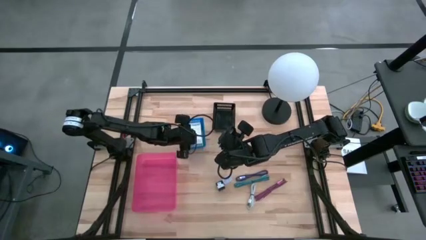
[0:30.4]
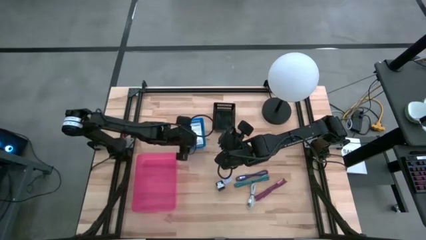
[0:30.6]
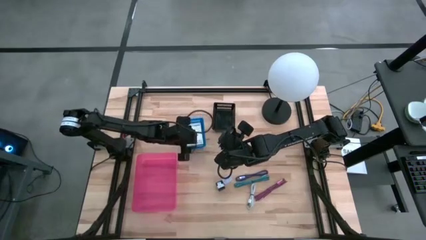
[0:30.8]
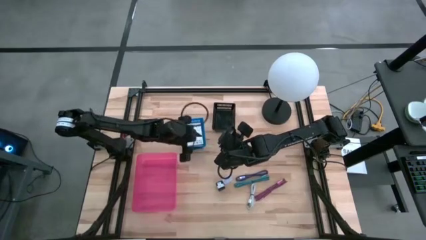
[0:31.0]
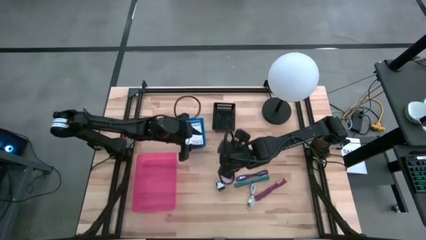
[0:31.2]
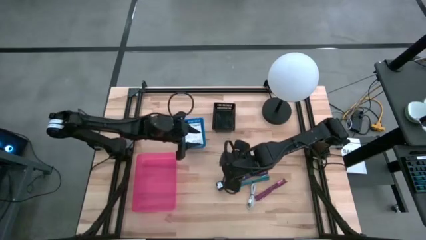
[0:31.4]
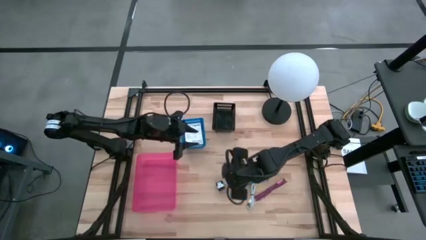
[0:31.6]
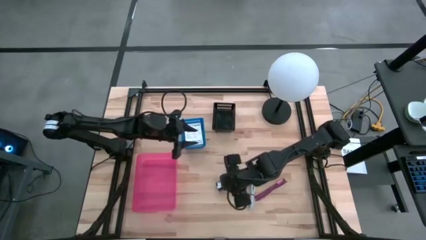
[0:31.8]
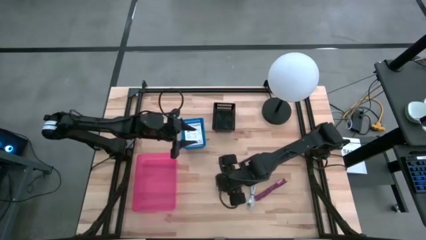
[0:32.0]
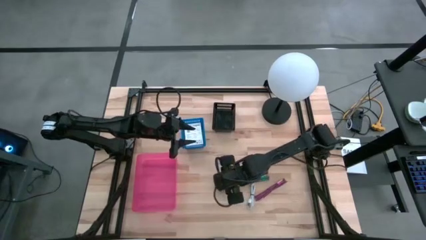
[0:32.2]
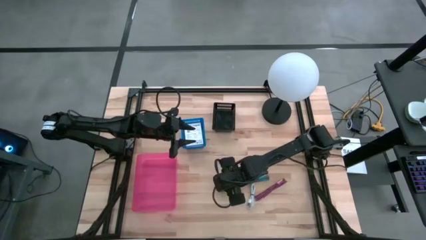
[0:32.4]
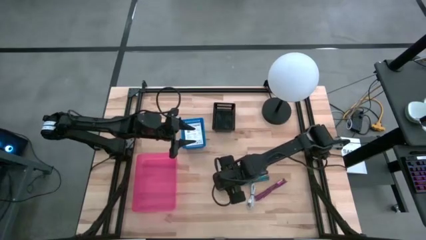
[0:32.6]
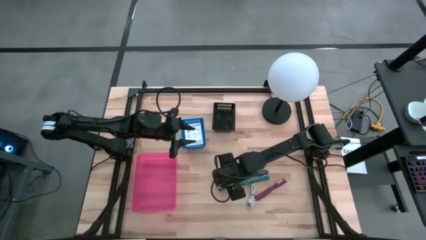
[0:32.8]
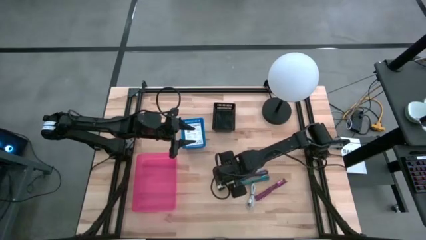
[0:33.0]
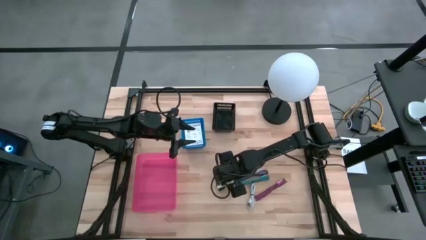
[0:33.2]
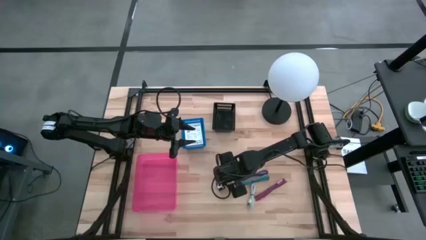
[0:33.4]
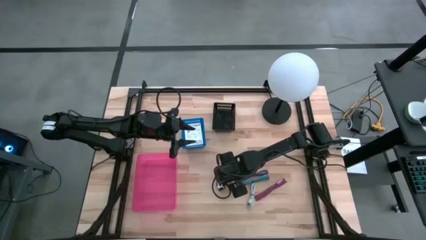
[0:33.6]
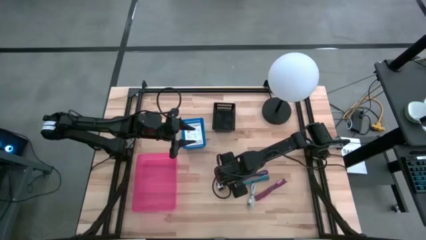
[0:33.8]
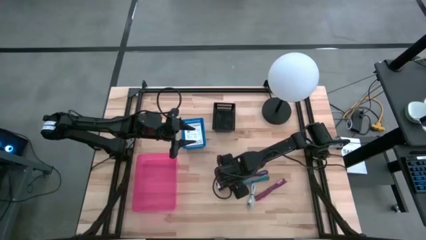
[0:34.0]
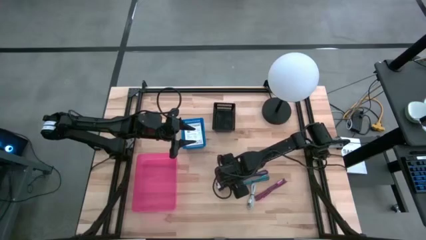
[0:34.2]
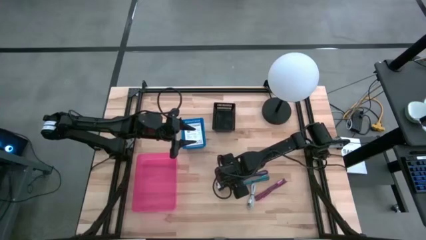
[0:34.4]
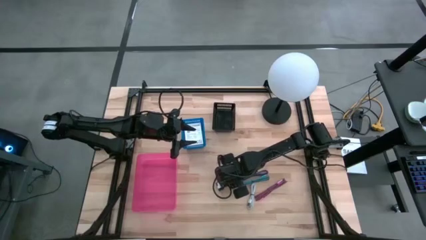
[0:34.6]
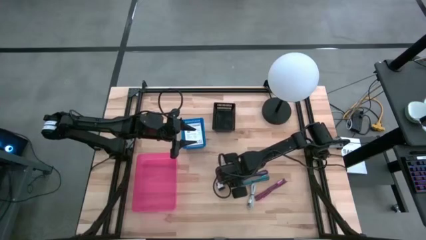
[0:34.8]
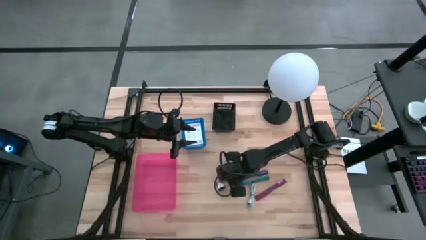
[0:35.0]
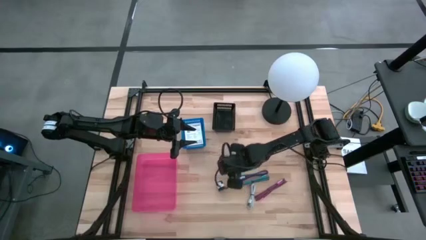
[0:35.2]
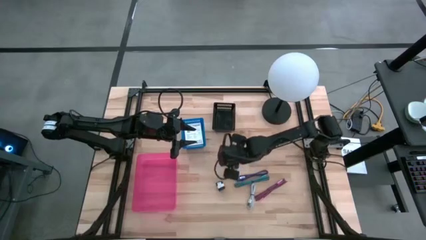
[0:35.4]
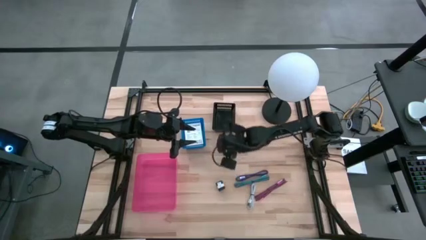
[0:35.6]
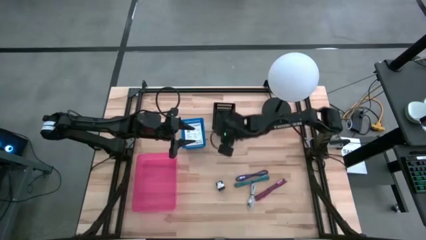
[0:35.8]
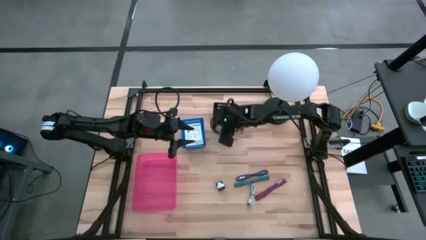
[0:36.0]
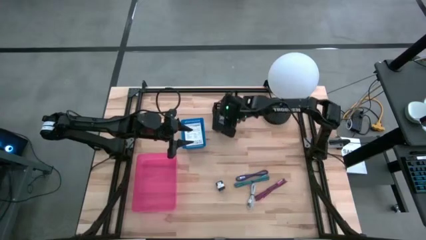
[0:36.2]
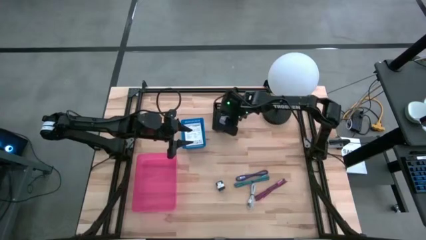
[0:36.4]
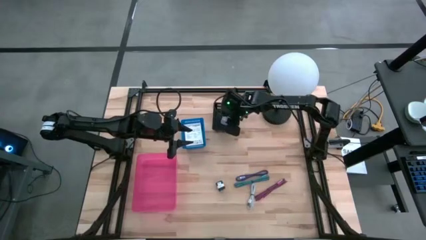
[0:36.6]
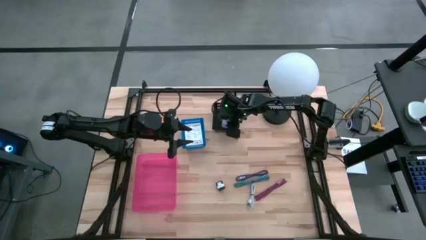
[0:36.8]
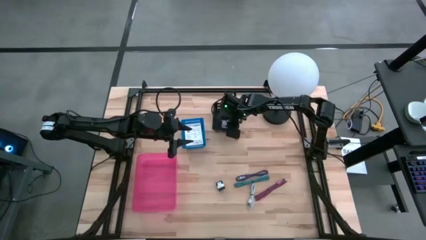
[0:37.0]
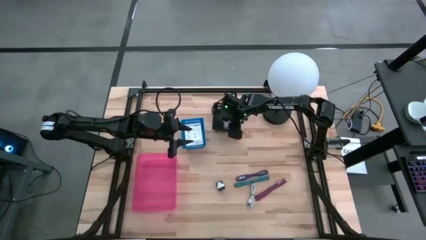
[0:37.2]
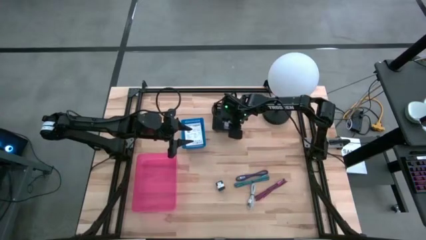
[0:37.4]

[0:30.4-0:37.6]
Task: Pick and place items into bin
Put the white charger adapter into the black bin

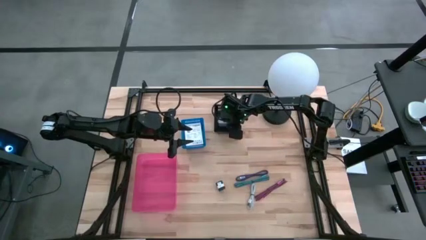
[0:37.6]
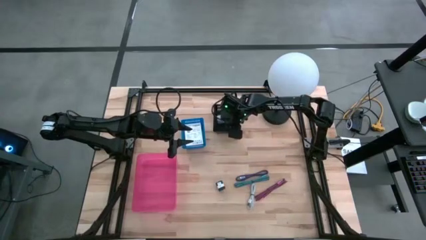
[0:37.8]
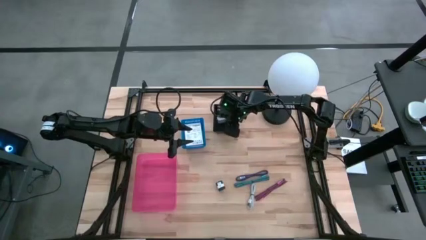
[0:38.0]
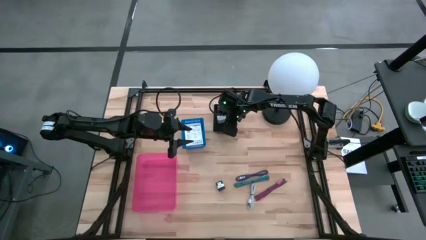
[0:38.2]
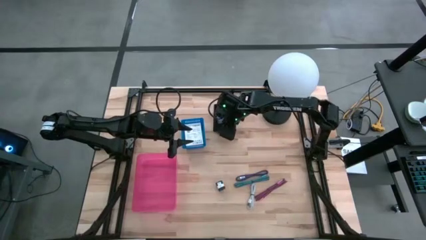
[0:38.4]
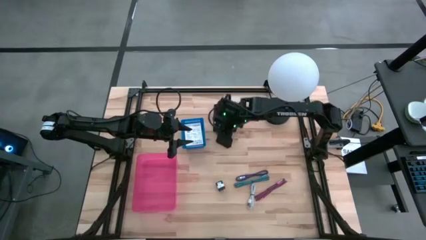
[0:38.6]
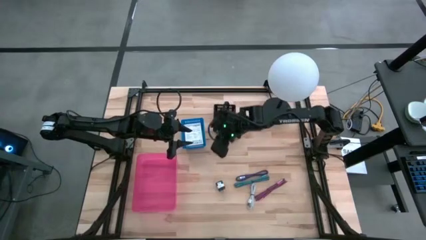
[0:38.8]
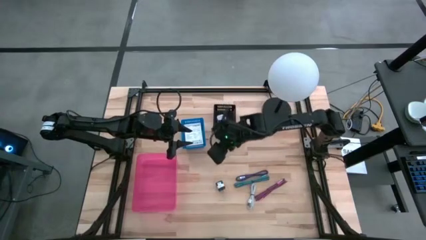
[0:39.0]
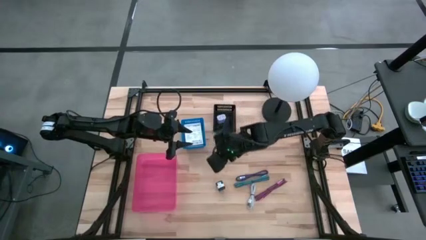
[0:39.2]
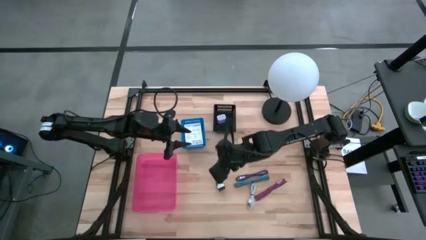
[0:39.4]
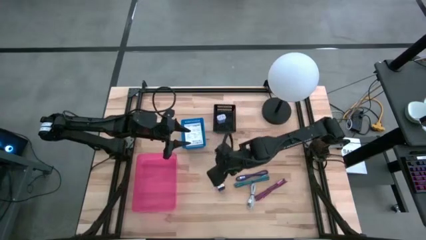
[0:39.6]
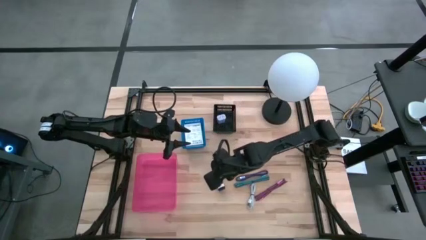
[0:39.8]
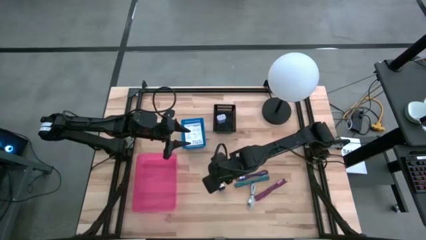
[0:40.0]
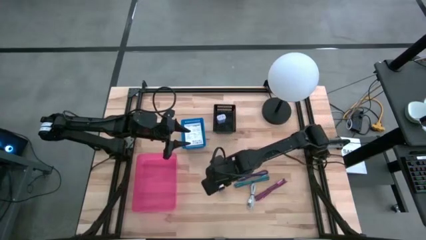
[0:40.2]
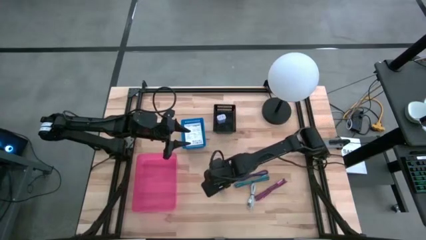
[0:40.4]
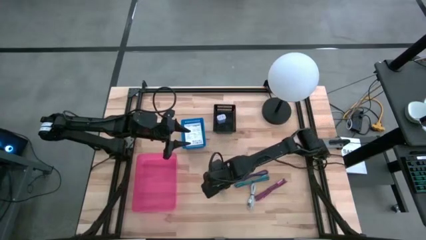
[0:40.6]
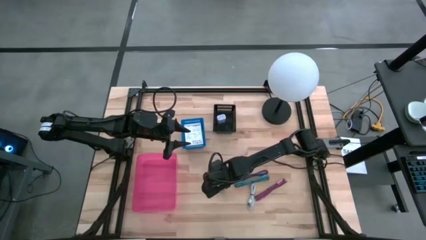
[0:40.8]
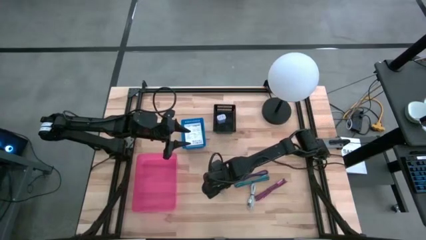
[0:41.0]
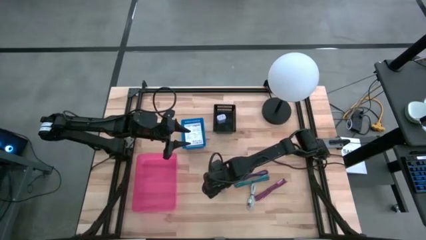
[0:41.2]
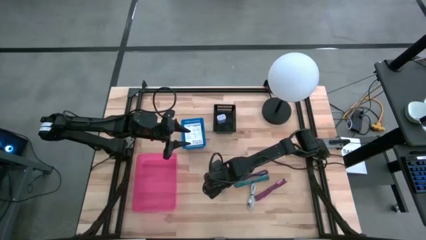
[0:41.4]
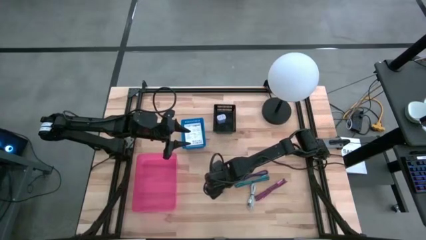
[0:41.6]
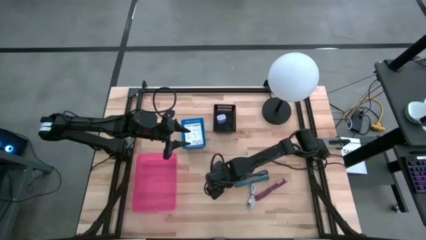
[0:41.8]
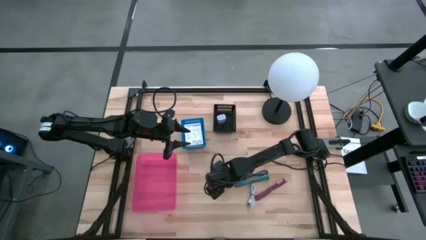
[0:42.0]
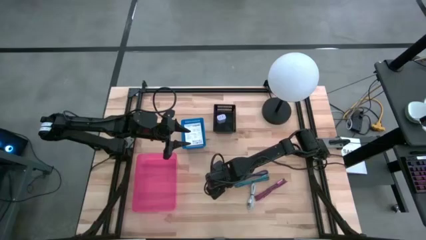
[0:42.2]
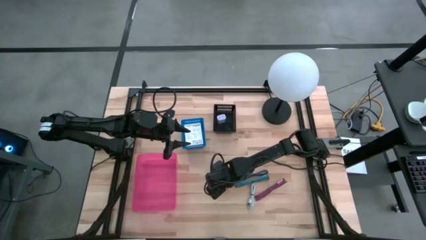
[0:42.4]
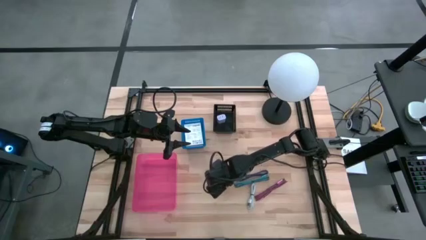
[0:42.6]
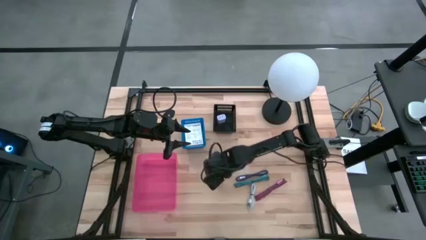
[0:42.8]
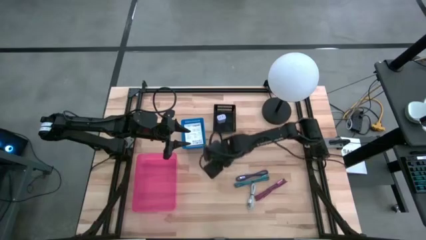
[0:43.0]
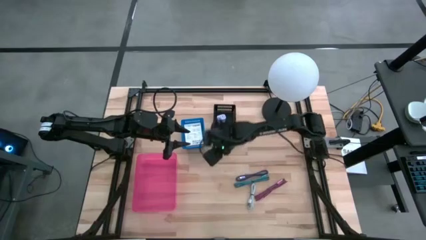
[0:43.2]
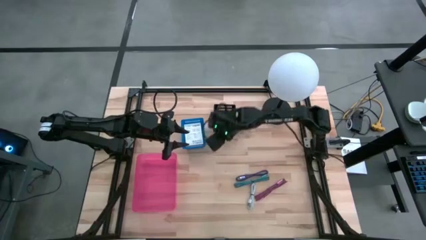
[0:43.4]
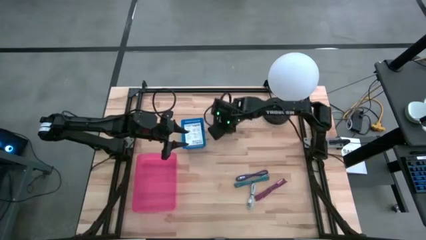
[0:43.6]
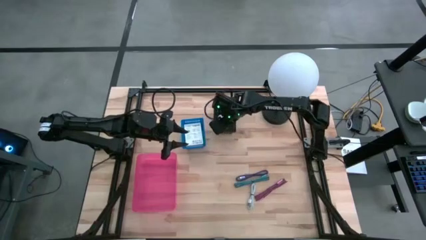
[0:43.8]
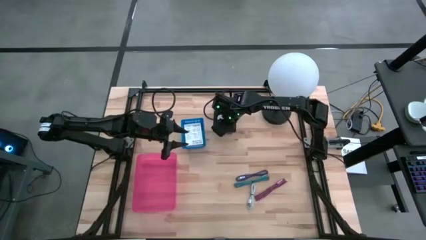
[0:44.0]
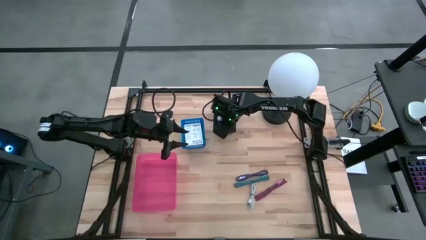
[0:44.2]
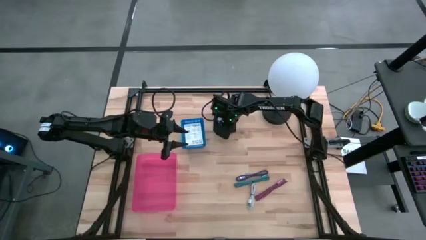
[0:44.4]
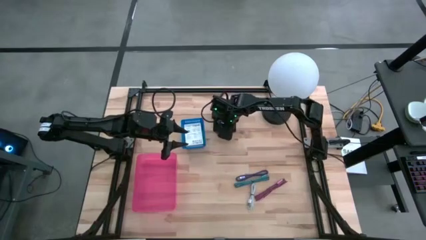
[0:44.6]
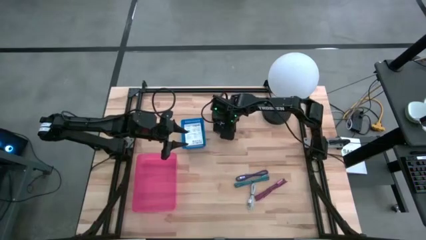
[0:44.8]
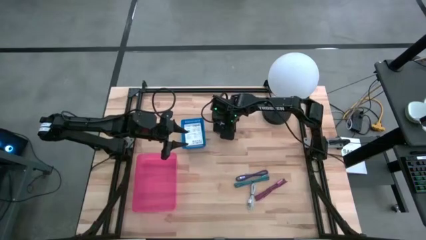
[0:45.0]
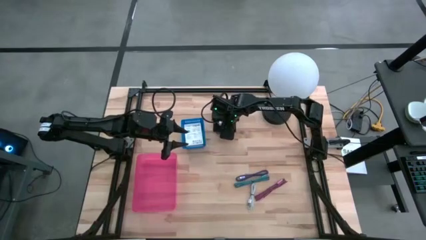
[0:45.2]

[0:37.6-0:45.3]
Put the black charger adapter into the black bin
